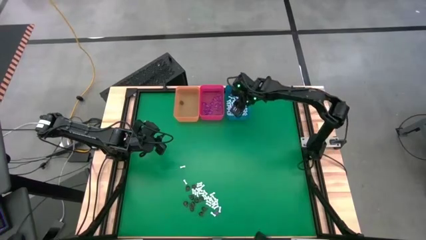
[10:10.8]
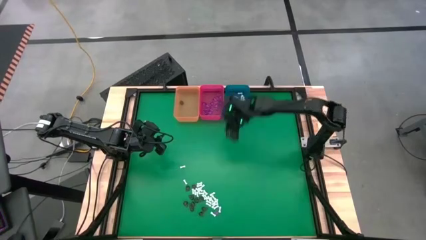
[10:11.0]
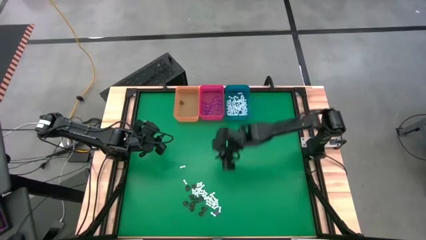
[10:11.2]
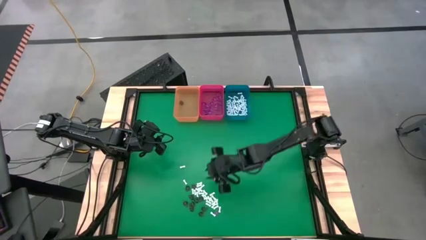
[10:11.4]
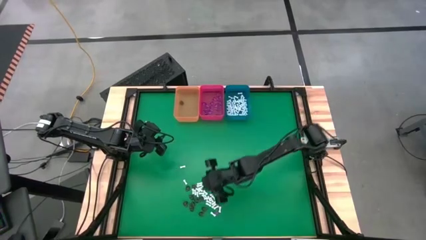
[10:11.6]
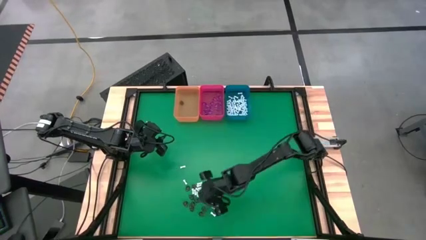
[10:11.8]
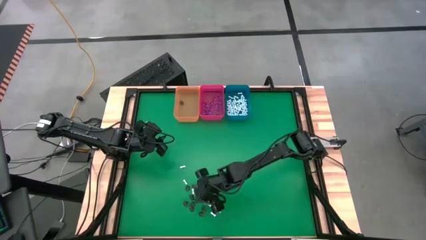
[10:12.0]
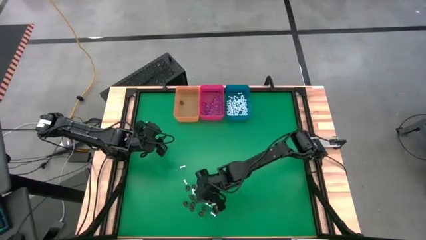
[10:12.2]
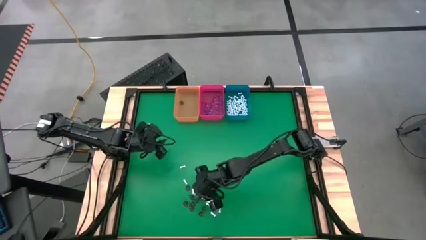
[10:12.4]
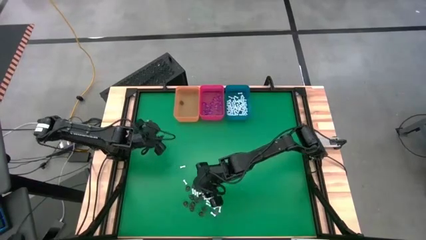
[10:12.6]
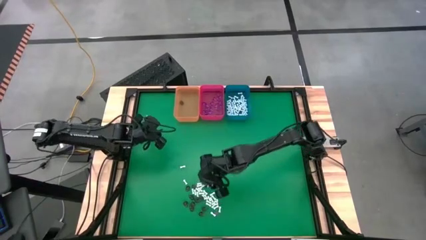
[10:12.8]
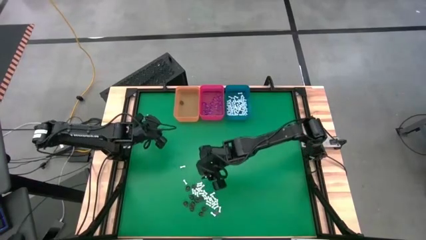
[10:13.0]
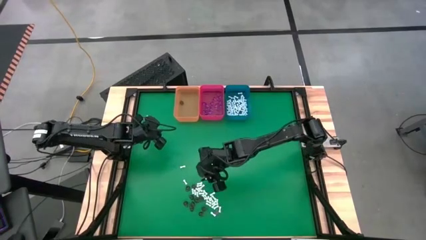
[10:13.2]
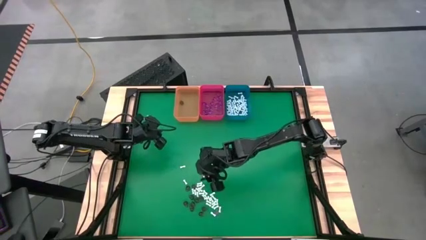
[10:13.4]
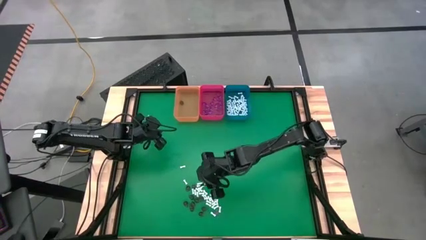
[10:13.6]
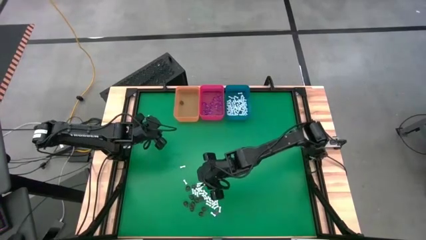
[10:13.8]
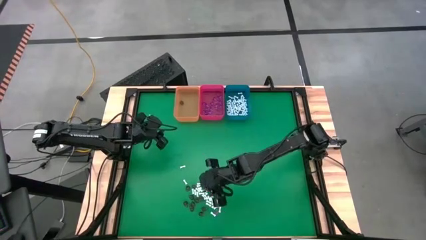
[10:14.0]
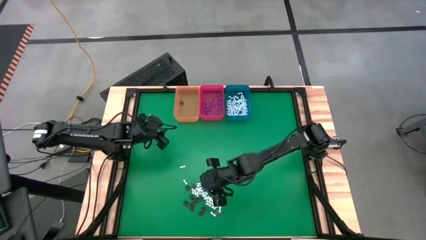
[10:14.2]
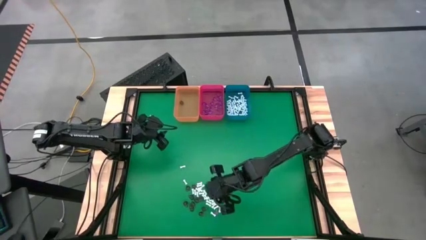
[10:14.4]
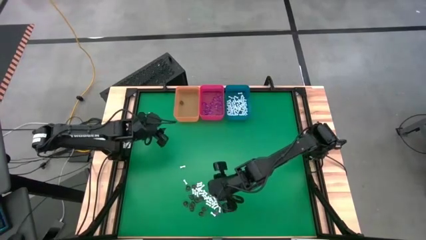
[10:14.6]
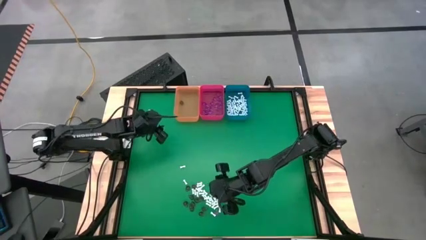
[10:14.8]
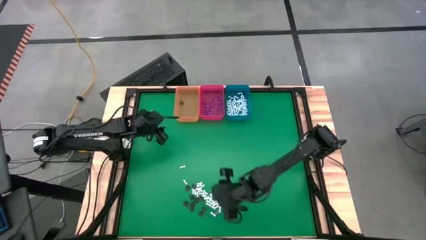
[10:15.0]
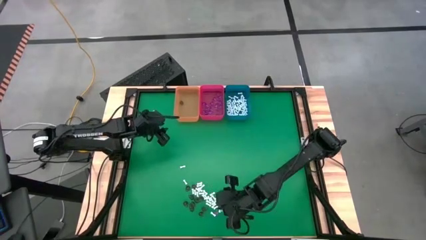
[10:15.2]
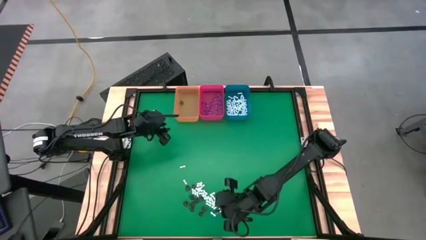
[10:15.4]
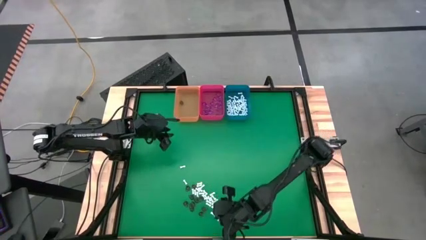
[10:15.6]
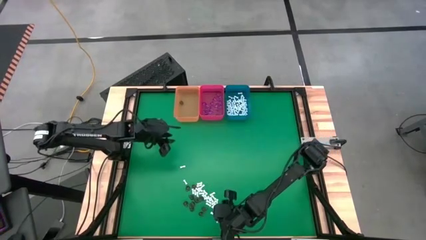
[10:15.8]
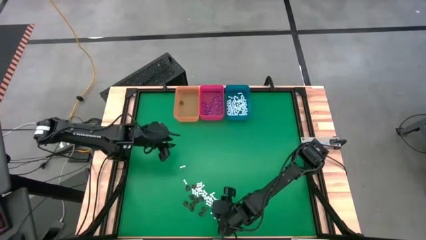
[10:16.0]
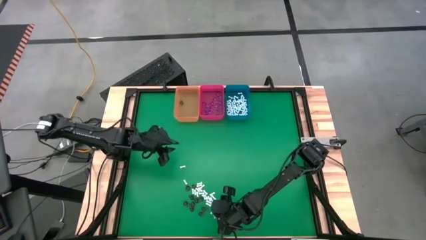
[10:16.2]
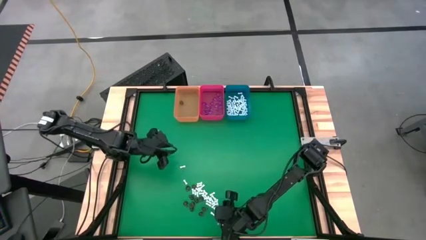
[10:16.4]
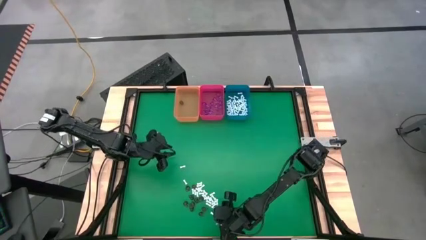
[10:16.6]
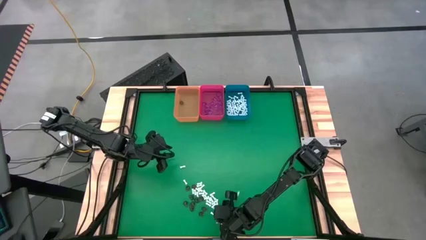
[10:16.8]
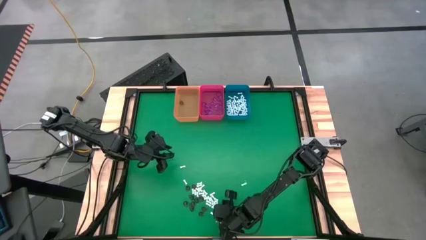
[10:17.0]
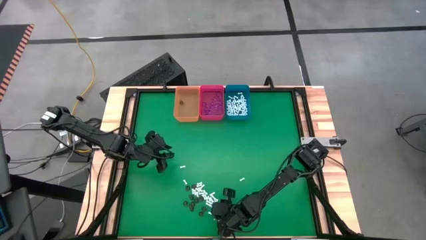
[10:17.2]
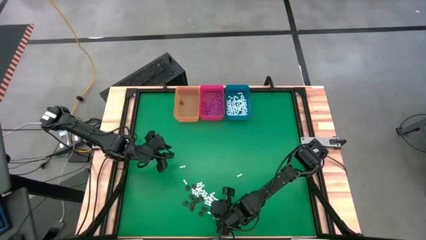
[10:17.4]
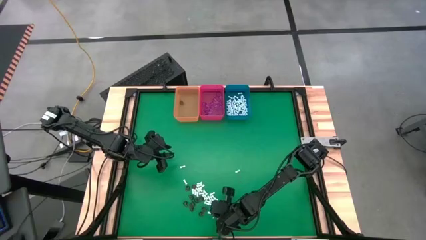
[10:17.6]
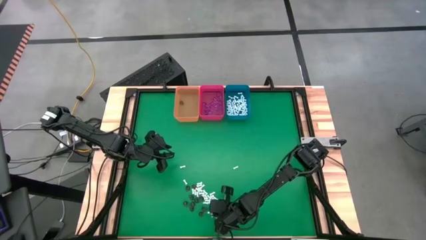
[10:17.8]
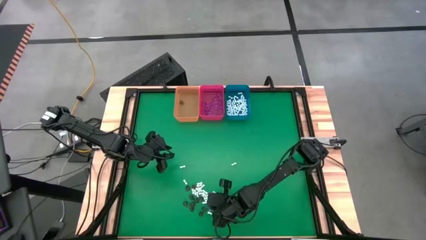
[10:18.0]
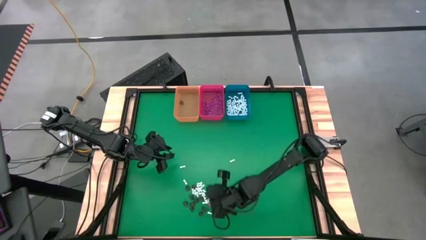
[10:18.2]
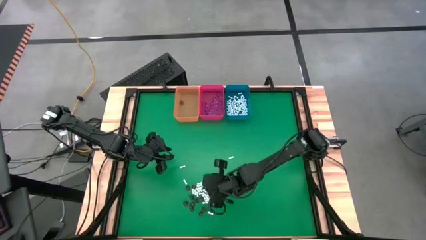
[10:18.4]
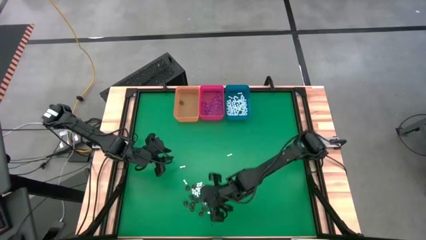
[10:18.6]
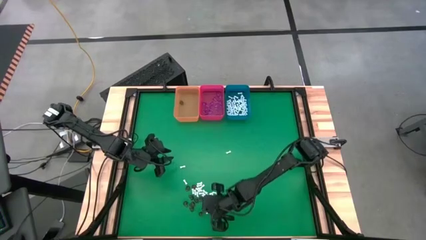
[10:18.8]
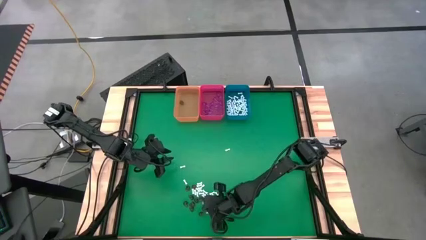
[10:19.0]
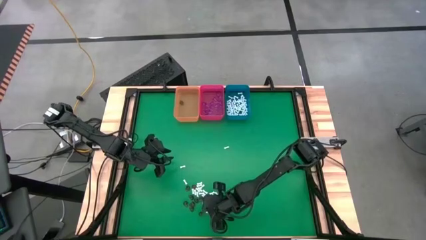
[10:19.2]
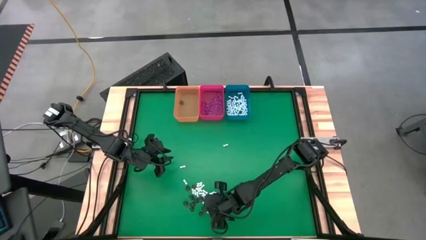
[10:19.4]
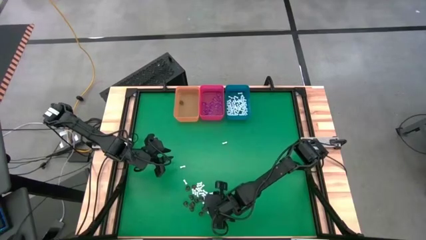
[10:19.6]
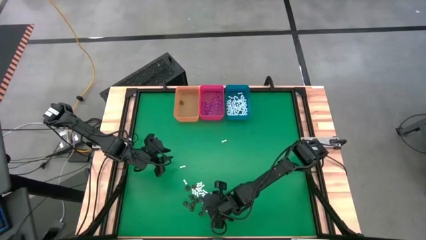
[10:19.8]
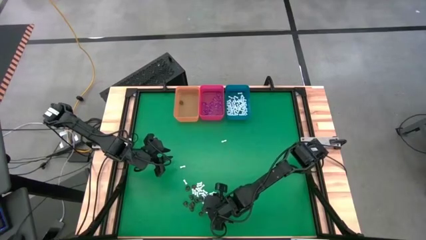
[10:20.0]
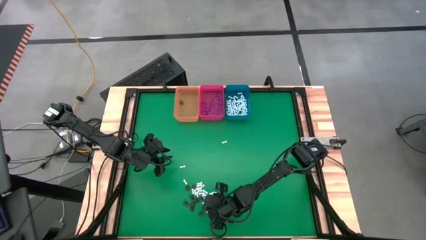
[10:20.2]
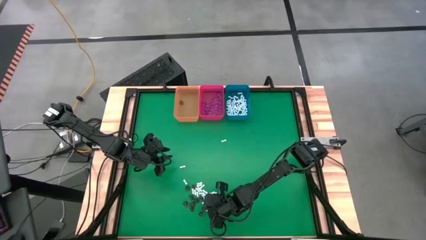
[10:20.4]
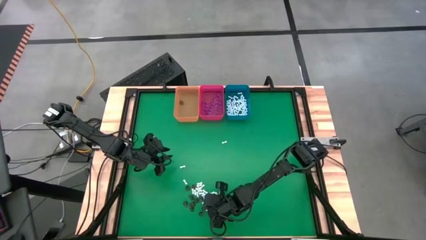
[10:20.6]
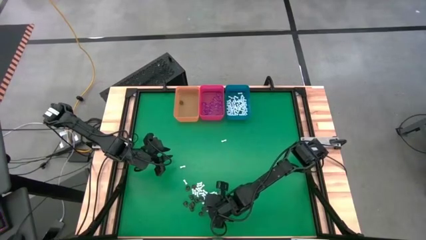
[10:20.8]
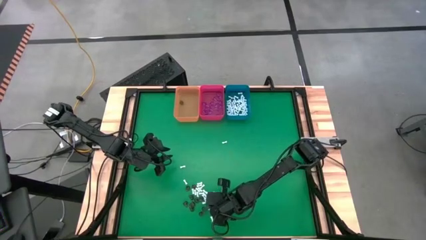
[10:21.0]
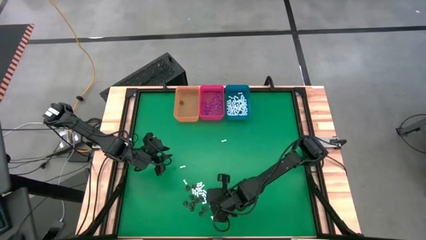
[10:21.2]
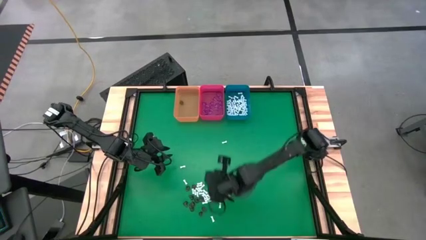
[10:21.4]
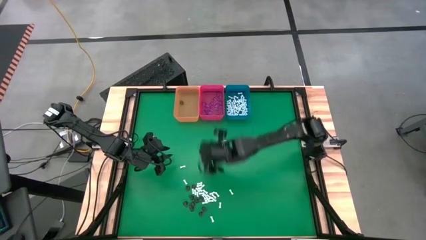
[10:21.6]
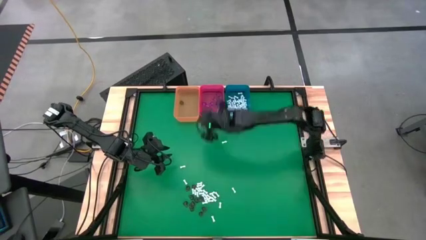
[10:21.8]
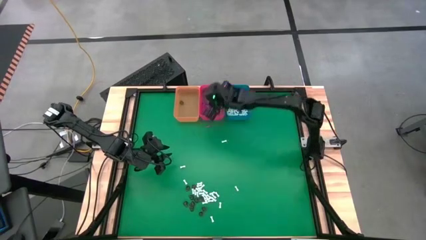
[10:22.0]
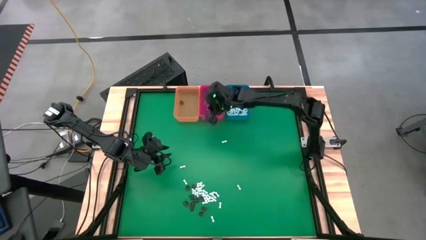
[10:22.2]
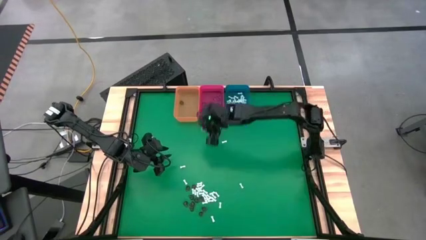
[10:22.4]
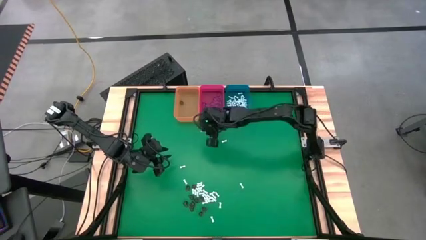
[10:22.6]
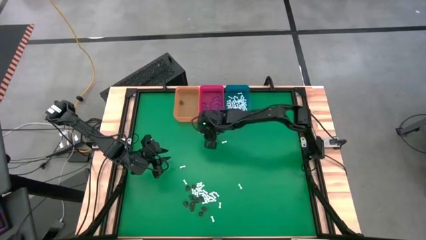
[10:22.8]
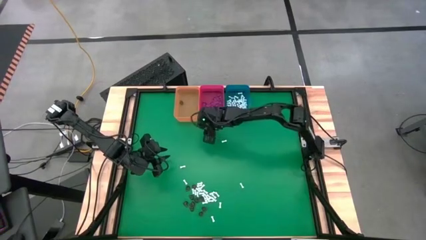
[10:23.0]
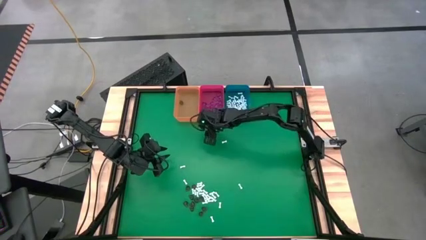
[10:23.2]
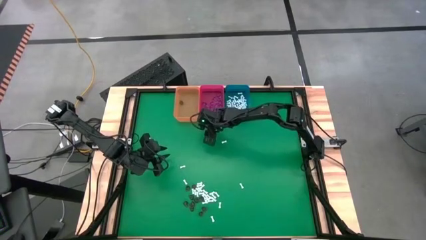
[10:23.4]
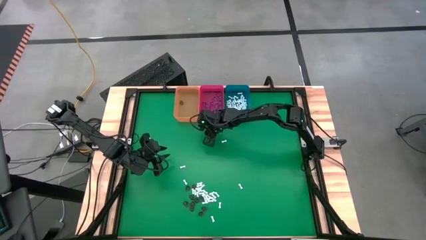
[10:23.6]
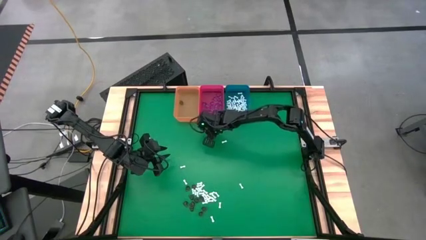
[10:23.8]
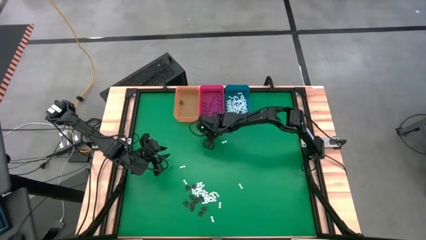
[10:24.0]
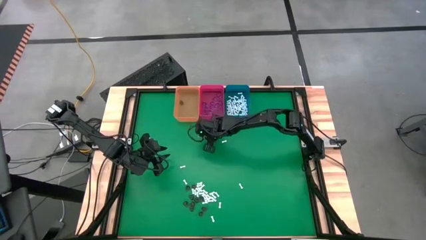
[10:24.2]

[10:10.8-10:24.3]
Task: Sort Halloween decoration
Put the violet witch hat toy into the red bin

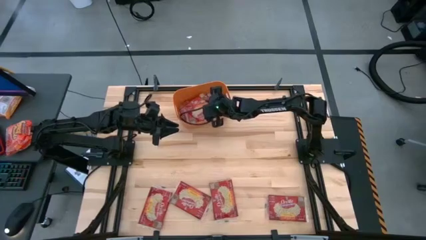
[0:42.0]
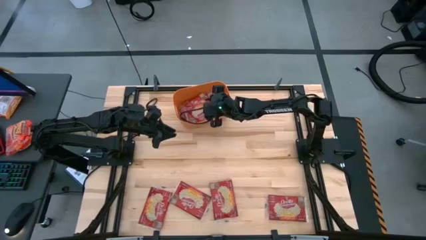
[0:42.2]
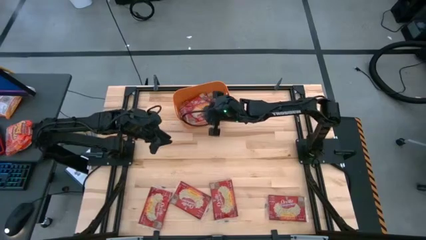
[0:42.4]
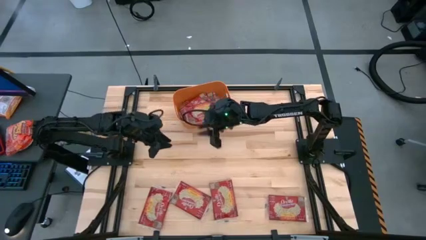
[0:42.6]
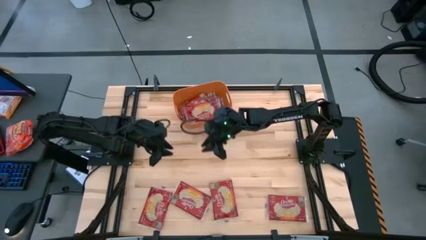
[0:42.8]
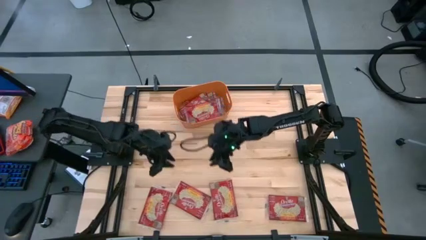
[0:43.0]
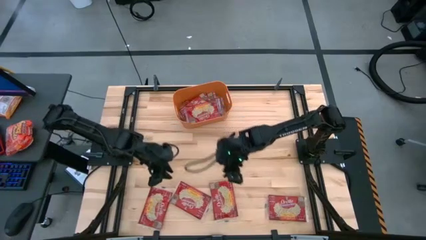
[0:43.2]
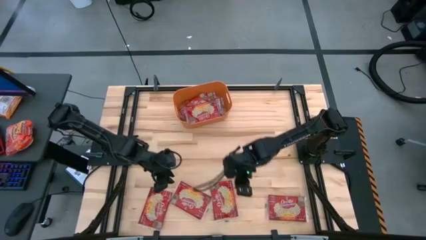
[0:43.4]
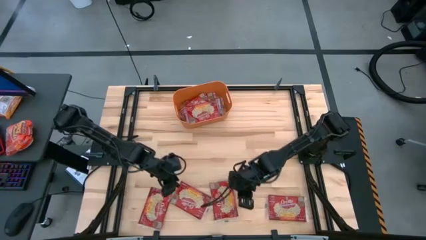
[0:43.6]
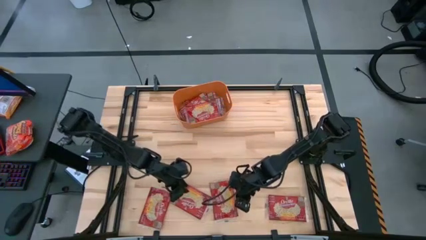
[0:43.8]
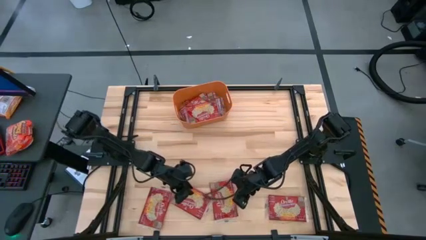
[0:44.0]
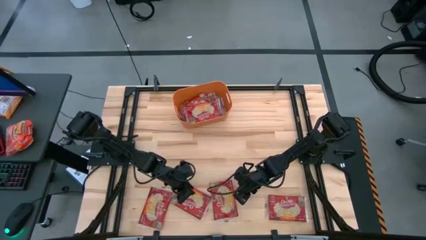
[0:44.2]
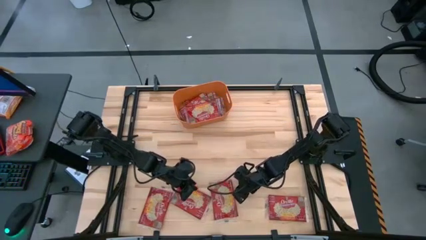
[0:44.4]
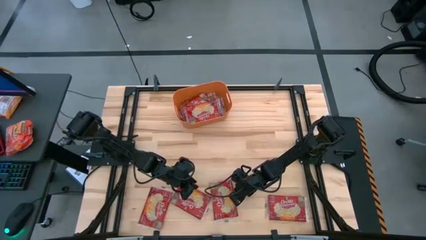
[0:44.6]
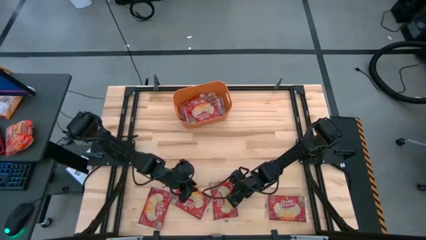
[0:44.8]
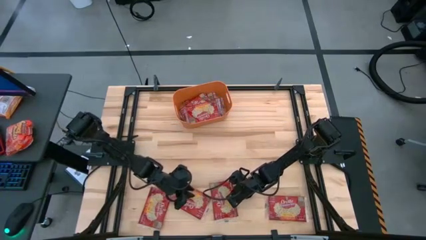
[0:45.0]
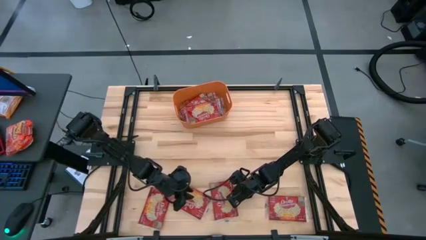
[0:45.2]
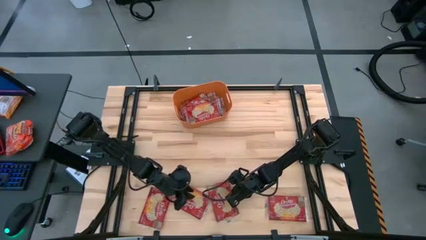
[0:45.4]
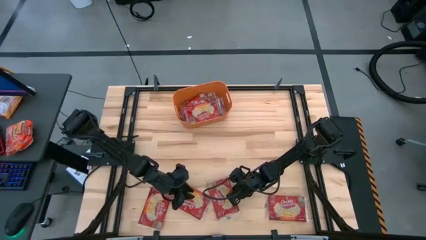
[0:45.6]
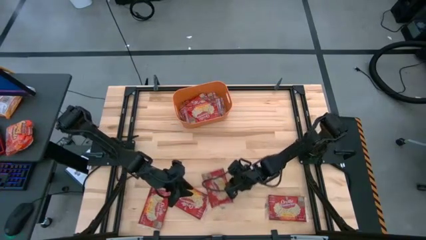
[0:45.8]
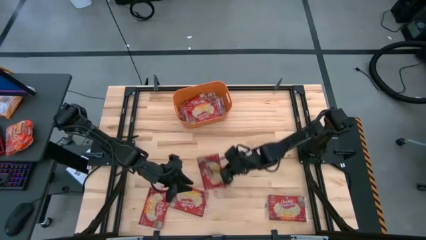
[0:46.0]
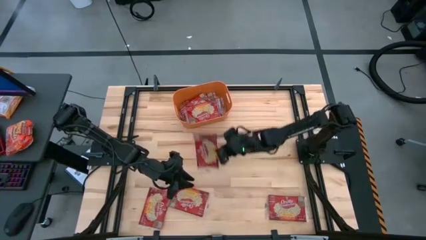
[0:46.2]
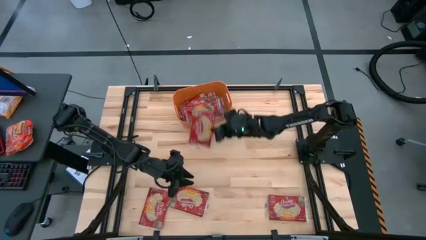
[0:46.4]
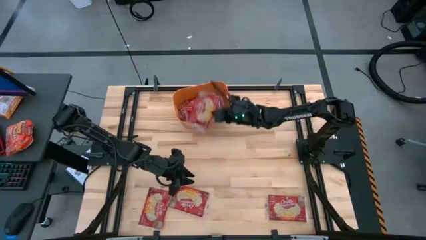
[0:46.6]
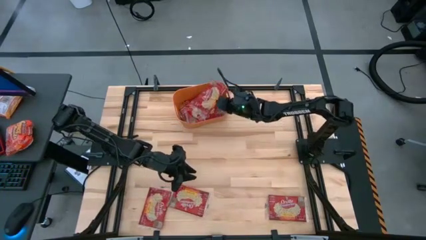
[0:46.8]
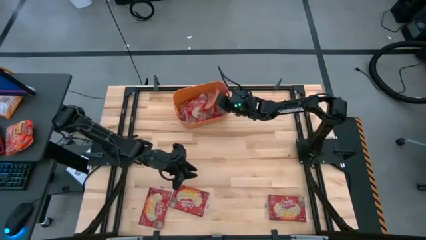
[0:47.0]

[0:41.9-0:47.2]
Task: Sort popcorn bags into baskets
Put the red popcorn bag into the orange bin
